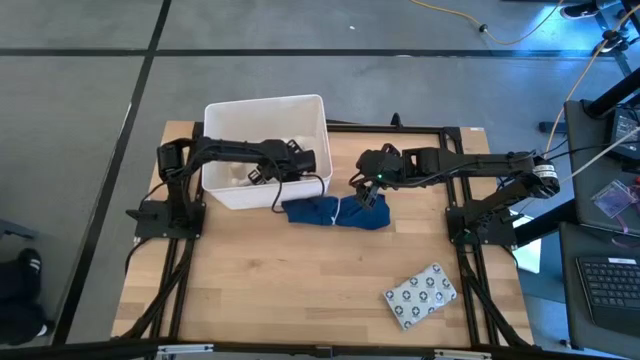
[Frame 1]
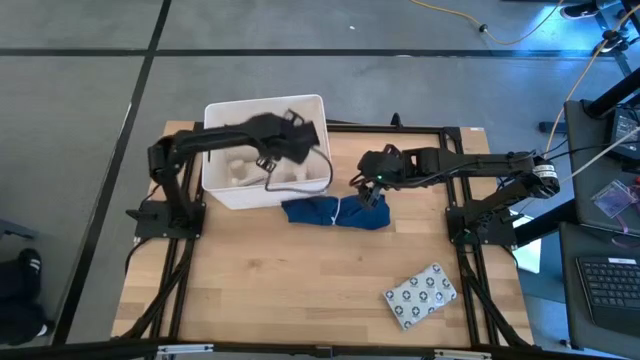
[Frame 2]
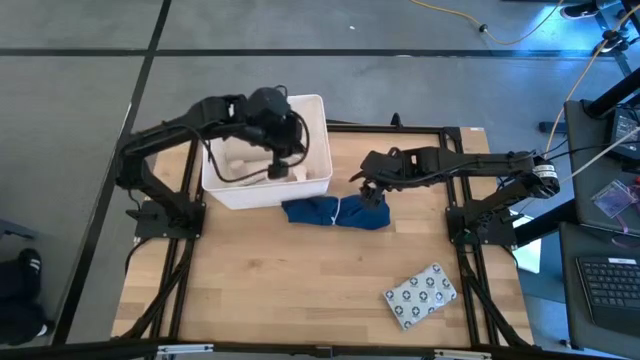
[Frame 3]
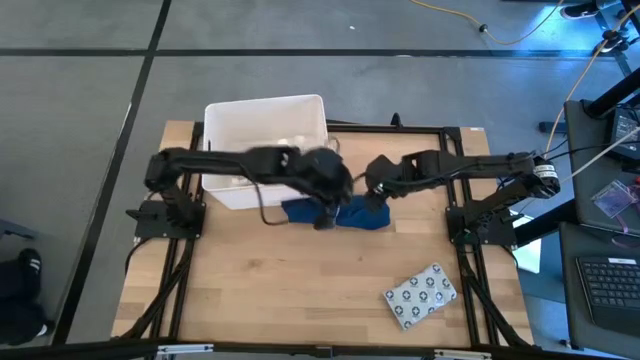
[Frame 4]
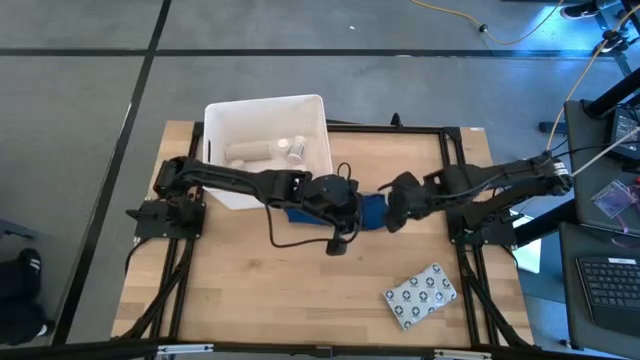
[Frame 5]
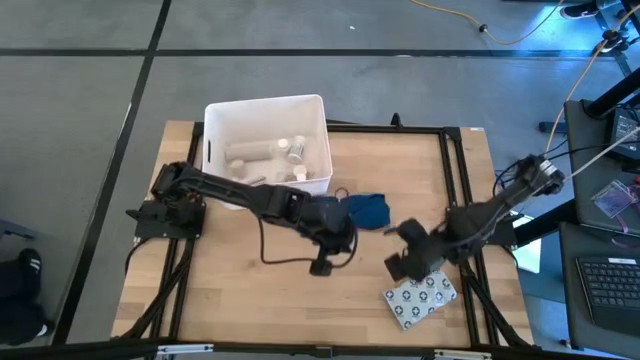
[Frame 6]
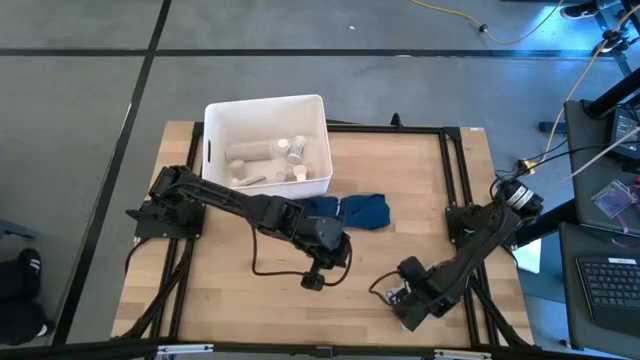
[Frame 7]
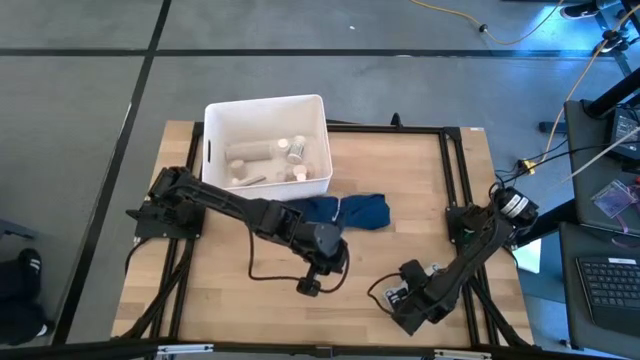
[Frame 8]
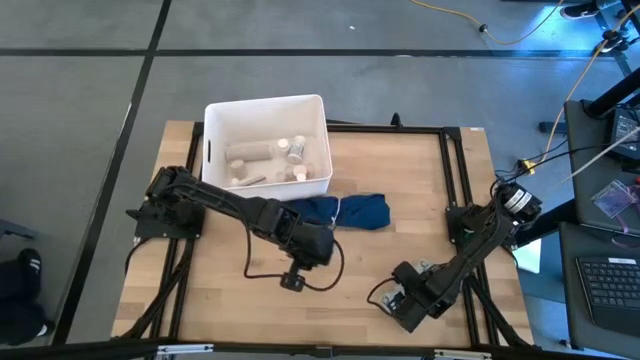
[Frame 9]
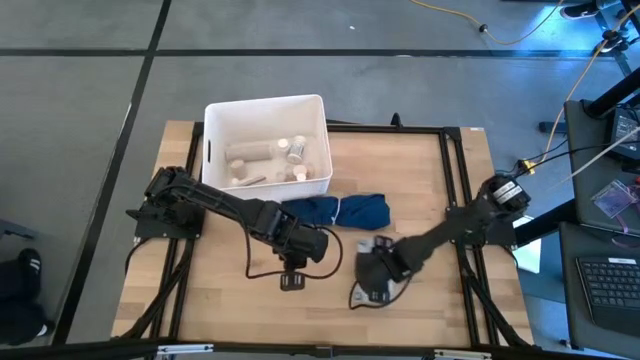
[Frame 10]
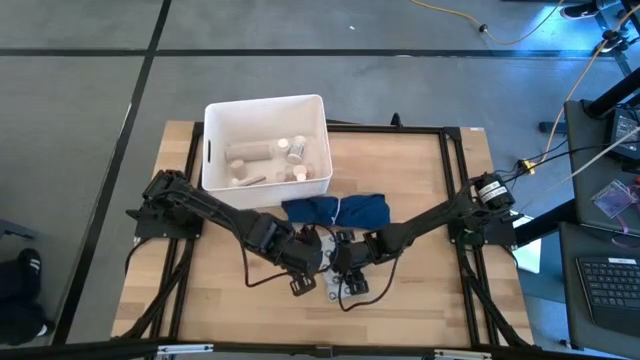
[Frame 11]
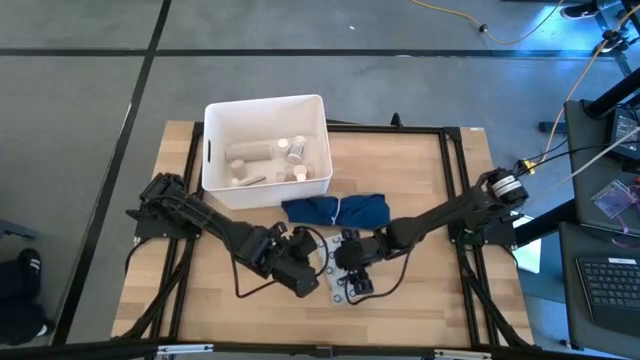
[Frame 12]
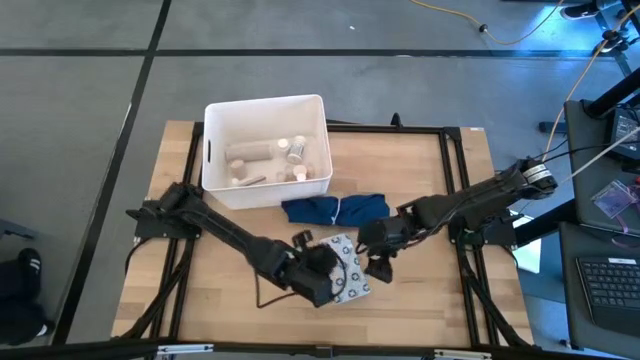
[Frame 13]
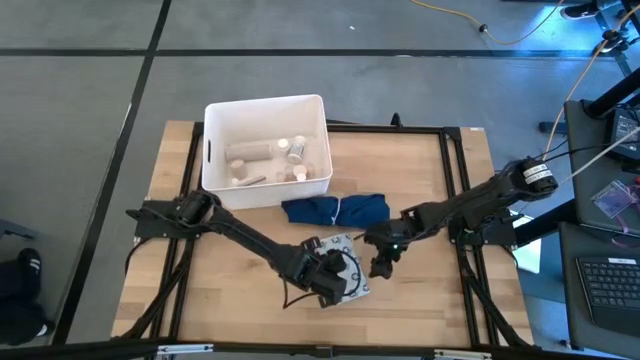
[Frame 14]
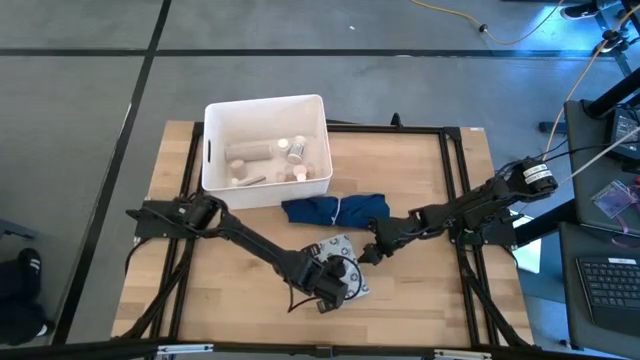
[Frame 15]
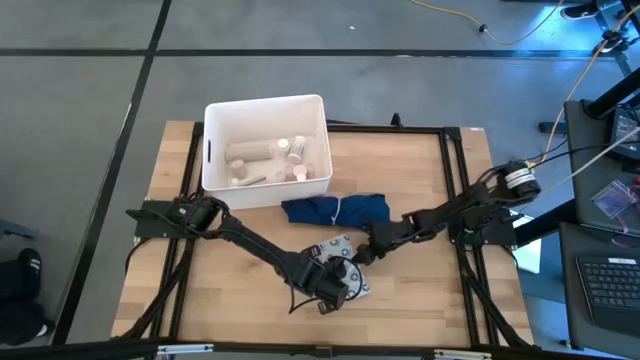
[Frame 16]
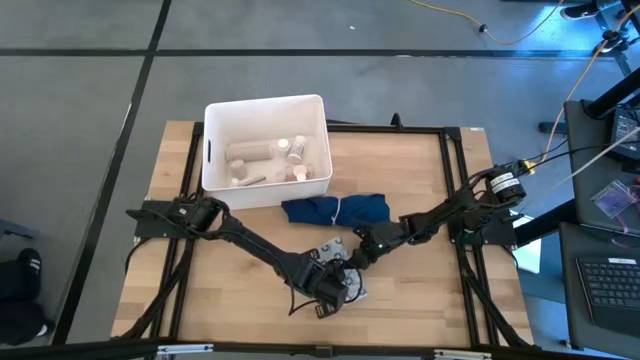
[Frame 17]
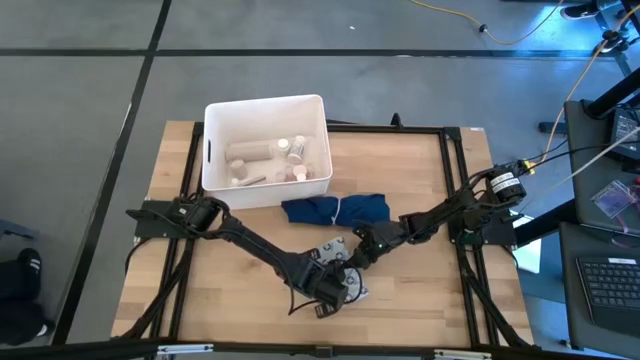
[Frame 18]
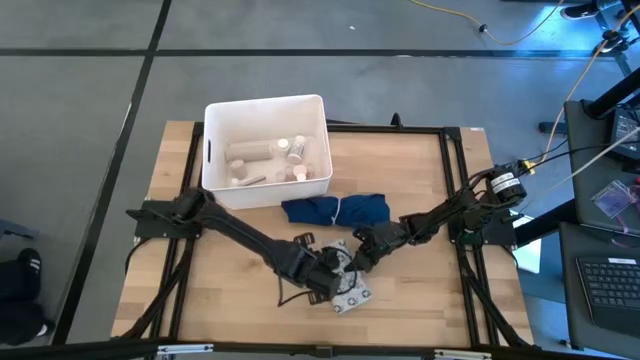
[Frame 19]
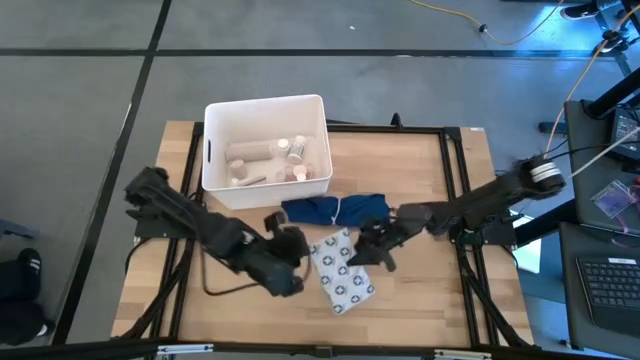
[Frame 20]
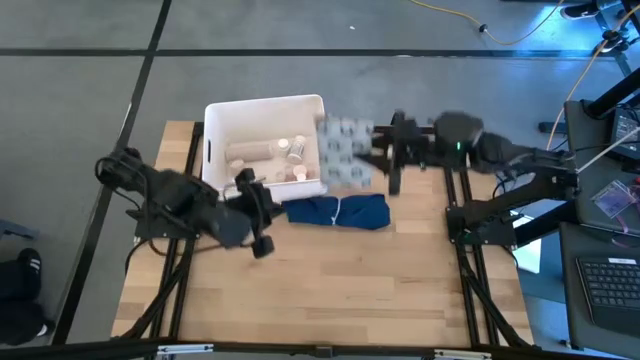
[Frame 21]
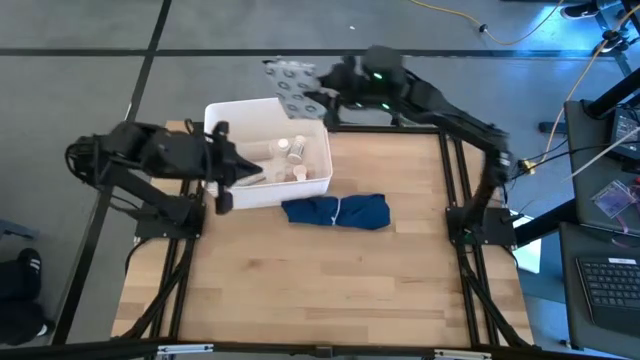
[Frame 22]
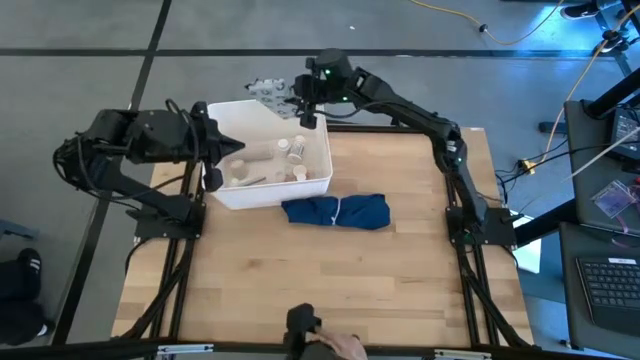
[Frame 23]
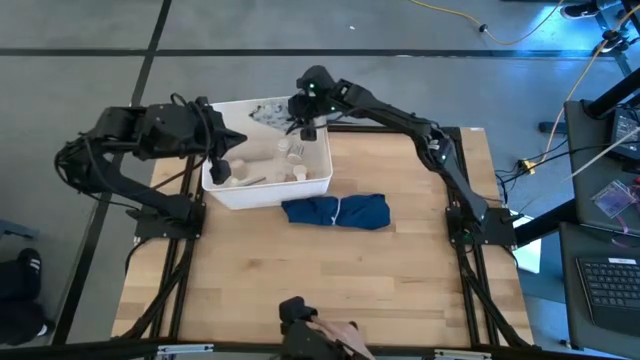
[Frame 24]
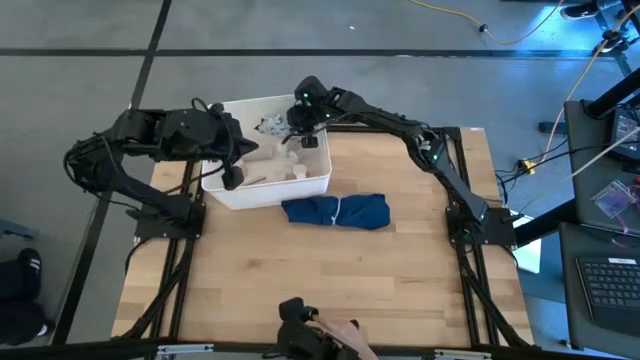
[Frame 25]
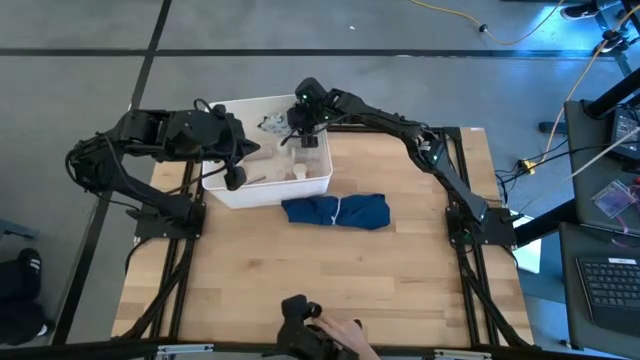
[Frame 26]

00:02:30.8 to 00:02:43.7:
Task: Pick & place medical supplies in basket/bin
Put the white mailer bag into the white container

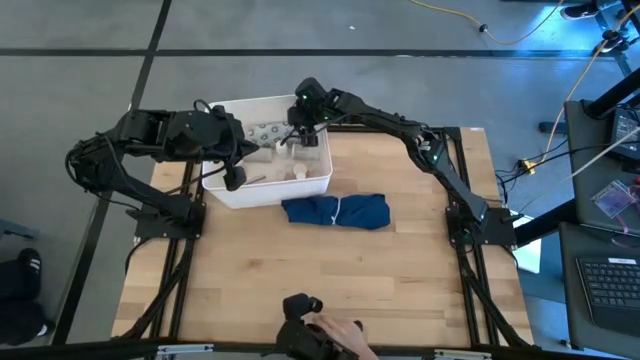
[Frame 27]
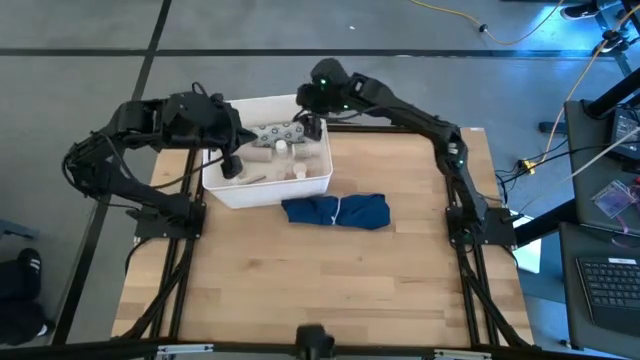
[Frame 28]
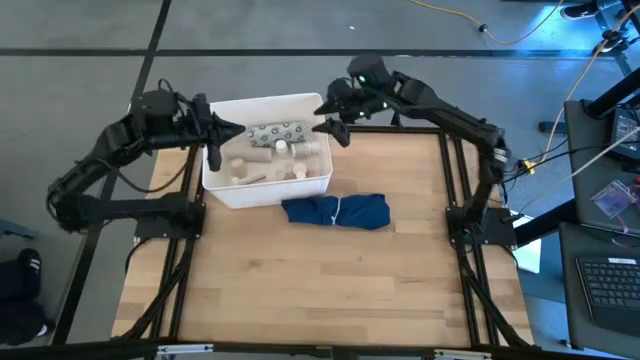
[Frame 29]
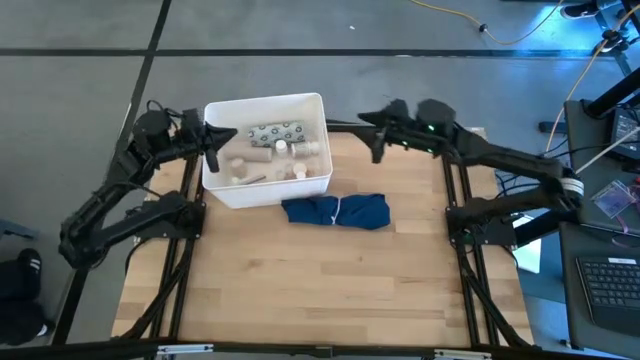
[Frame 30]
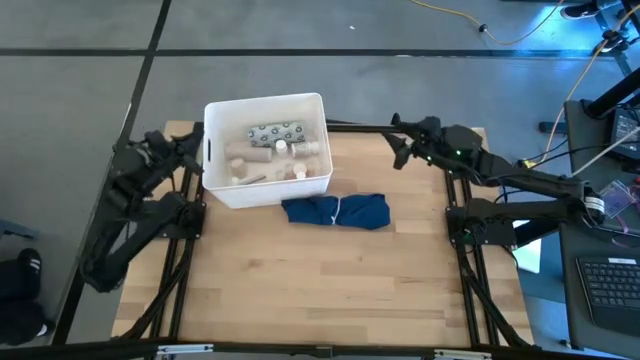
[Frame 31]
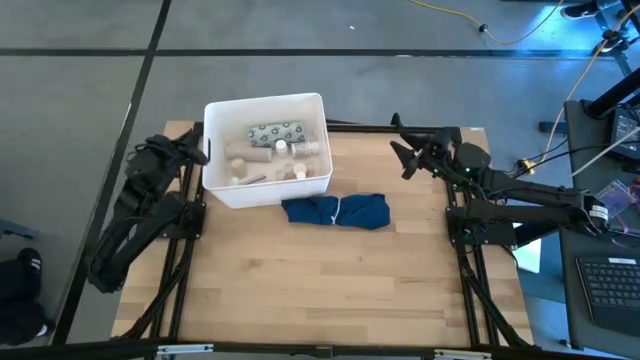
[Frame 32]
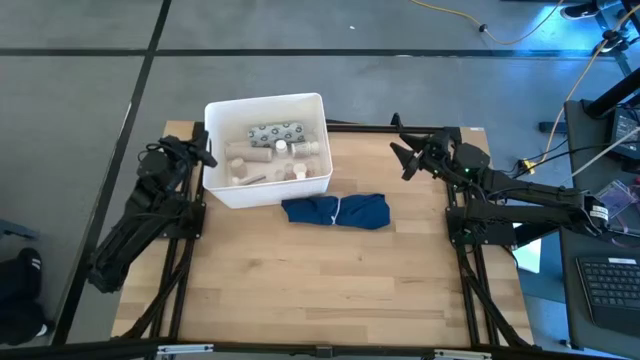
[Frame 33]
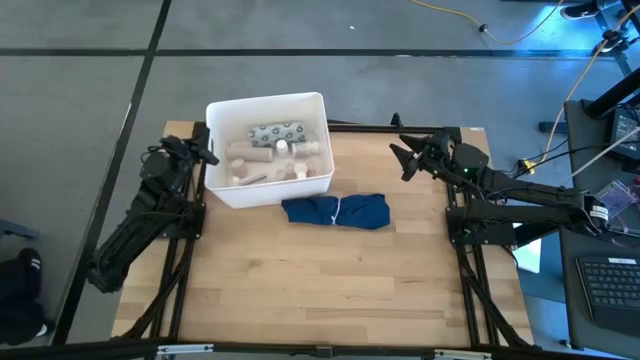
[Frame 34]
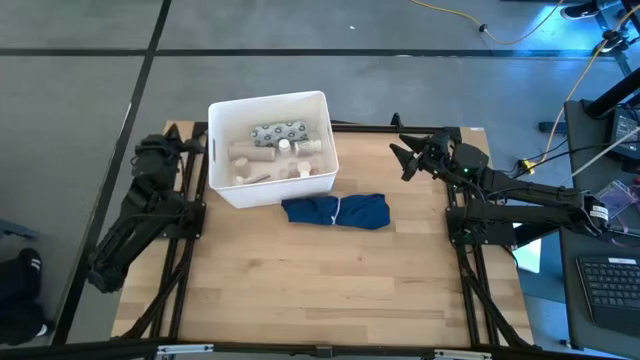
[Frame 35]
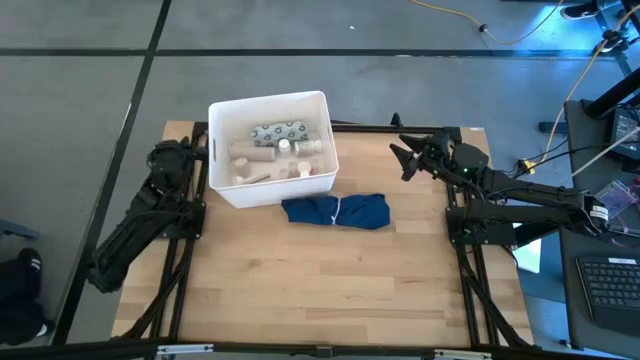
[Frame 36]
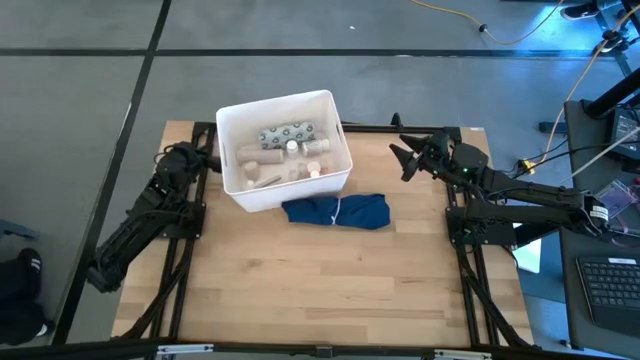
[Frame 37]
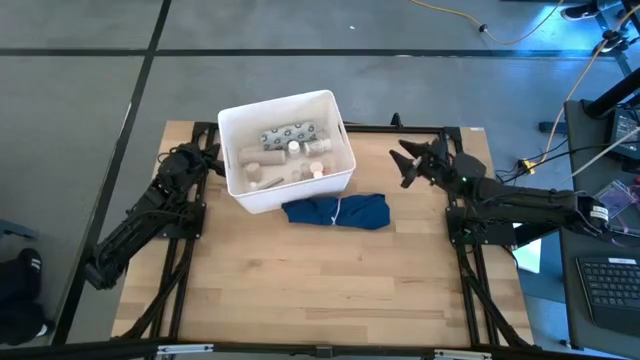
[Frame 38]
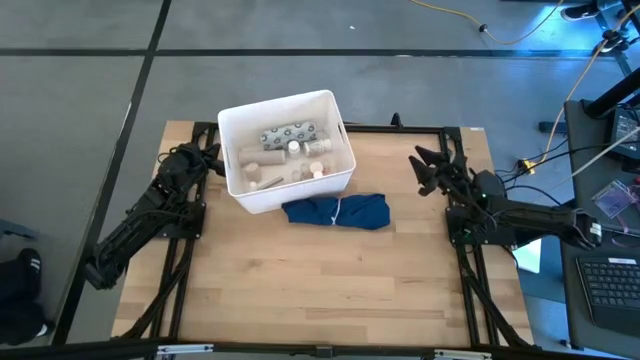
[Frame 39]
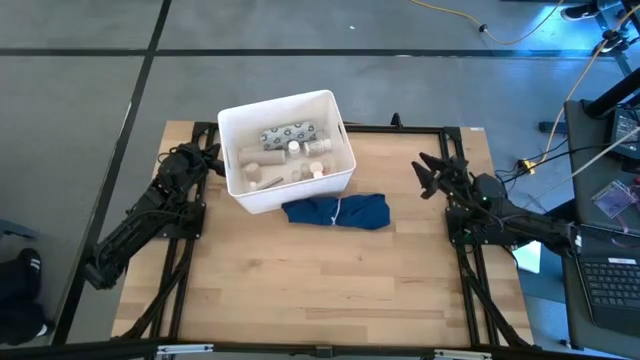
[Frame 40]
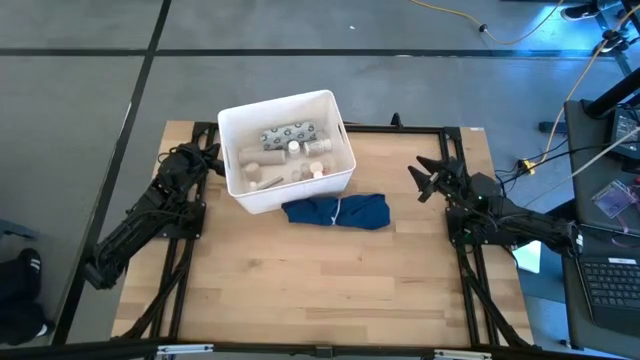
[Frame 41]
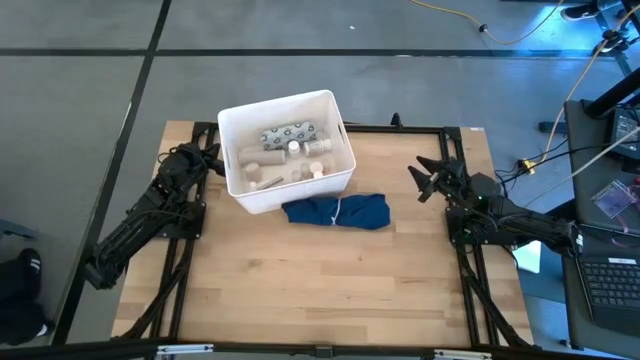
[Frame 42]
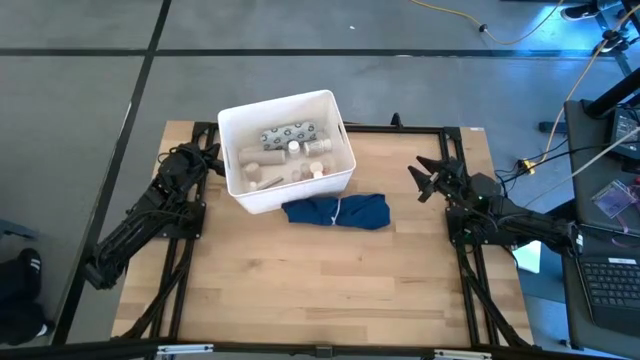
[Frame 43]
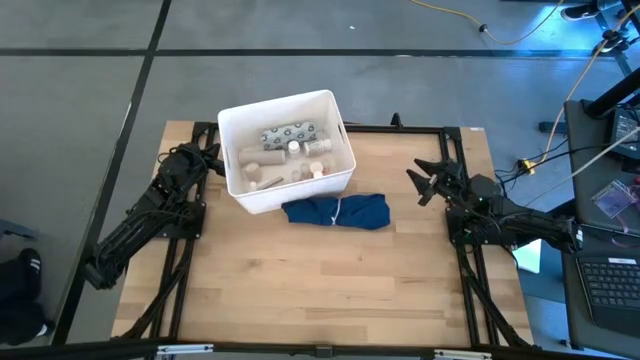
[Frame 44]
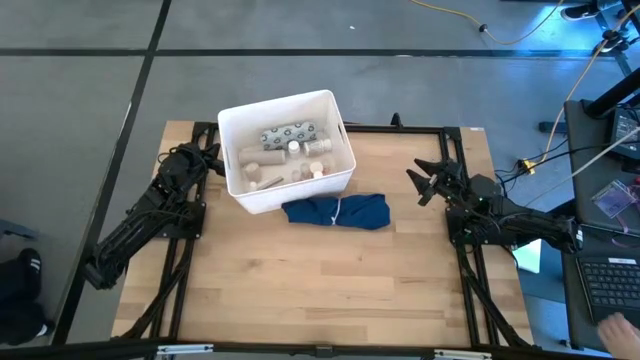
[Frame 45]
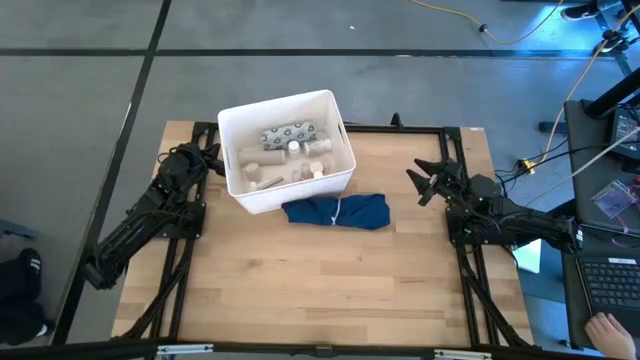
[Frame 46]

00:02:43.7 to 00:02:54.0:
Return to Home Position
